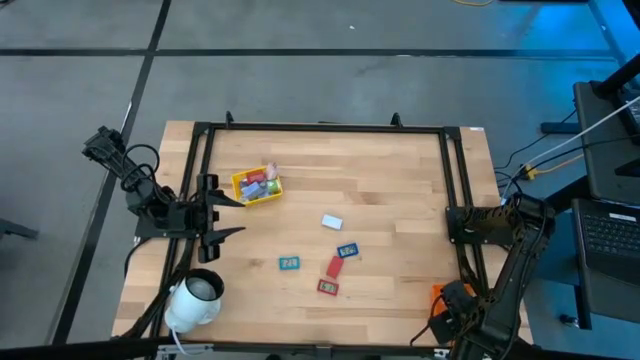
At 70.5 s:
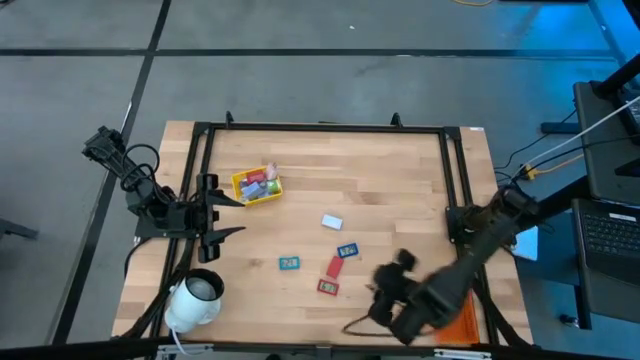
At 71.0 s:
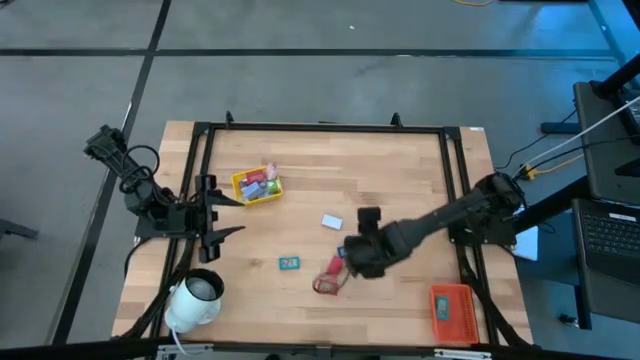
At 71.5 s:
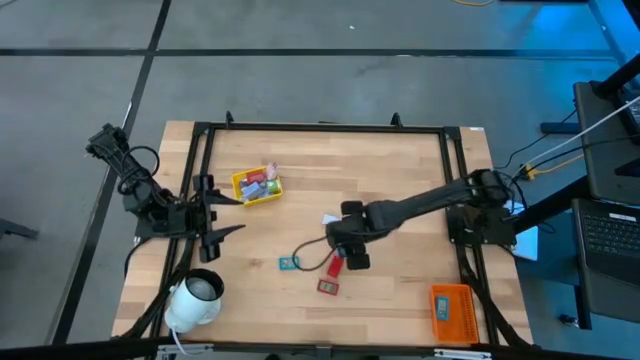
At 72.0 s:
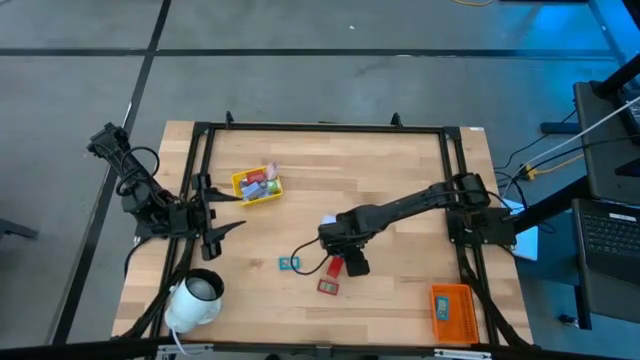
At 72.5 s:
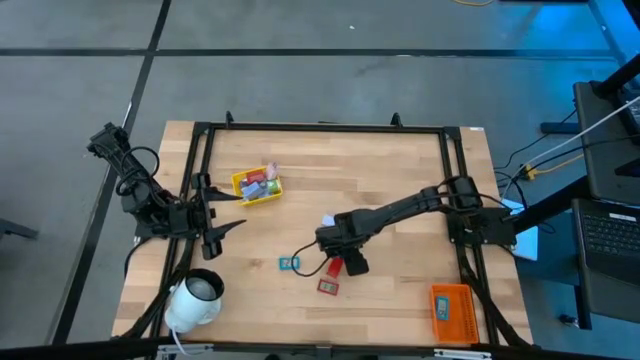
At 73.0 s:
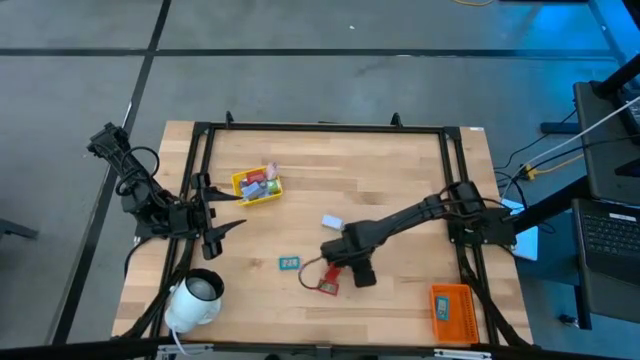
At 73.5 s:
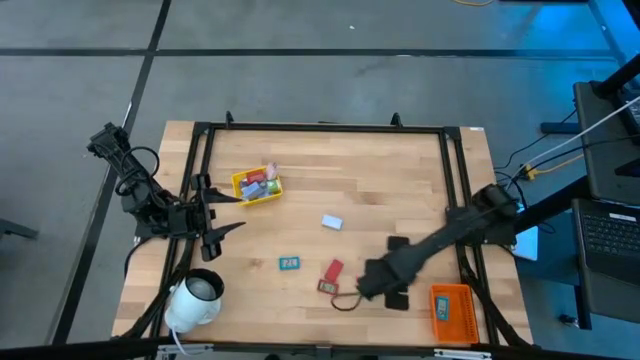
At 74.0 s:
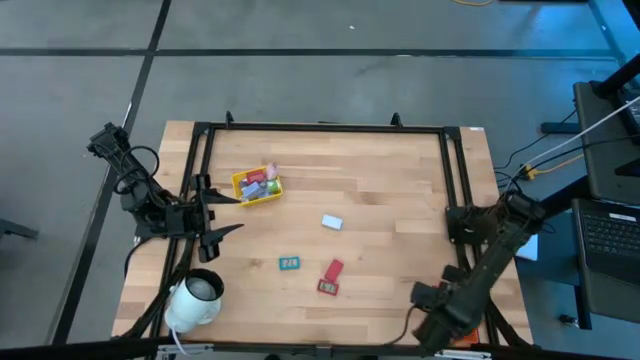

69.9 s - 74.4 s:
Task: Pick & Place Office items
Put the dark blue digital timer into the orange bin

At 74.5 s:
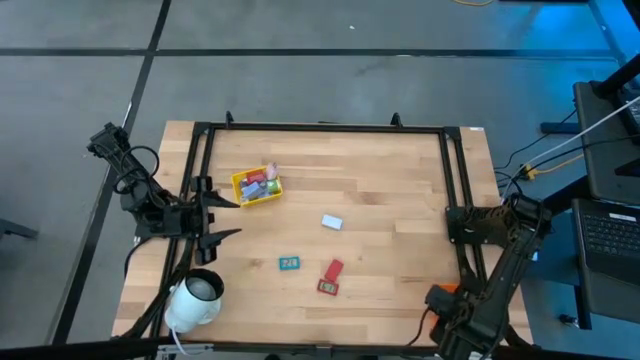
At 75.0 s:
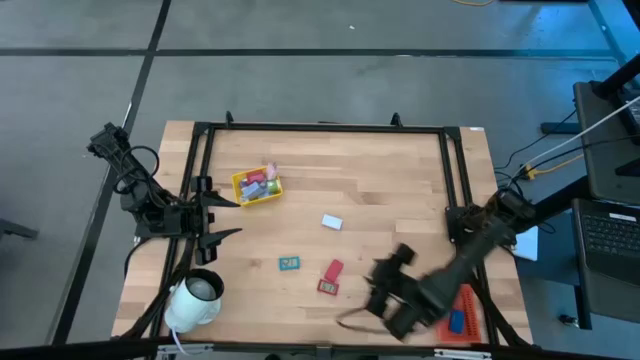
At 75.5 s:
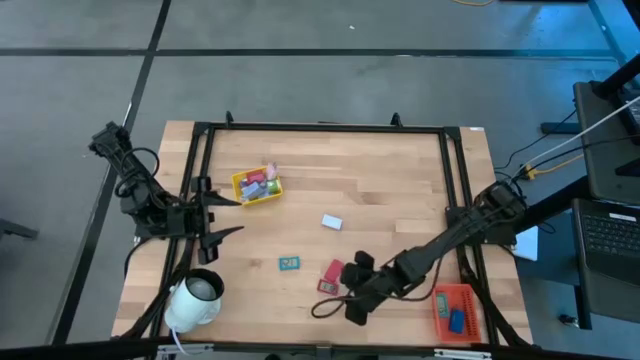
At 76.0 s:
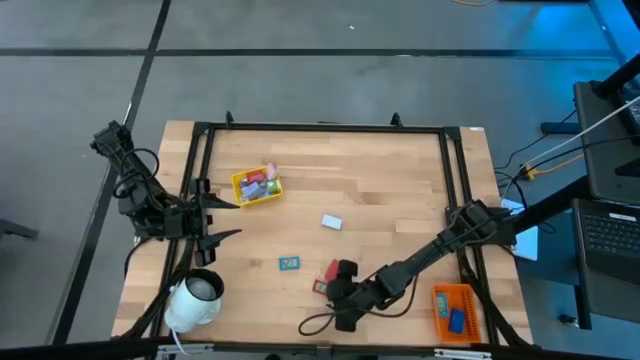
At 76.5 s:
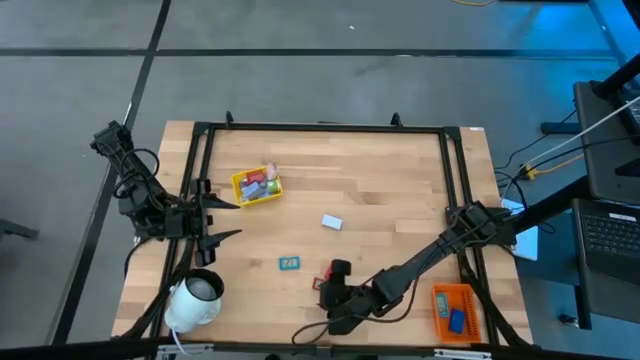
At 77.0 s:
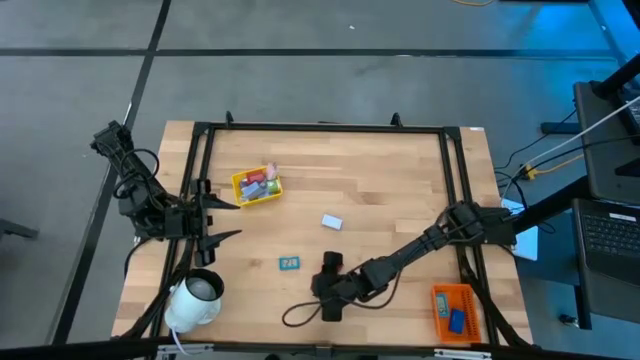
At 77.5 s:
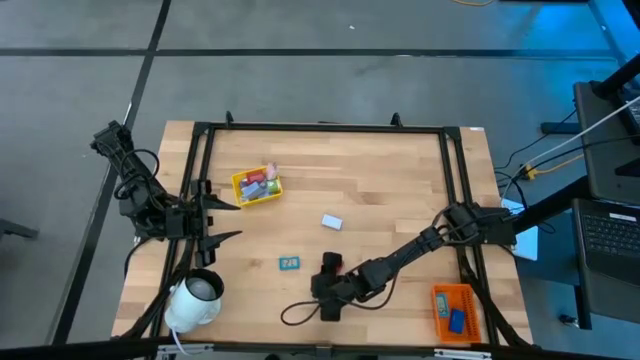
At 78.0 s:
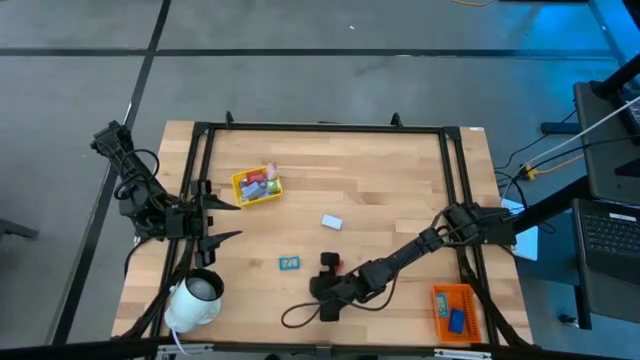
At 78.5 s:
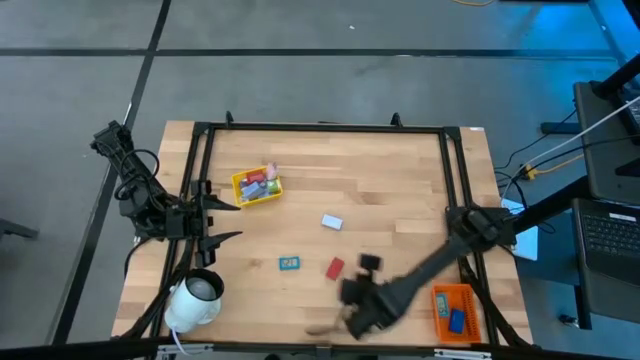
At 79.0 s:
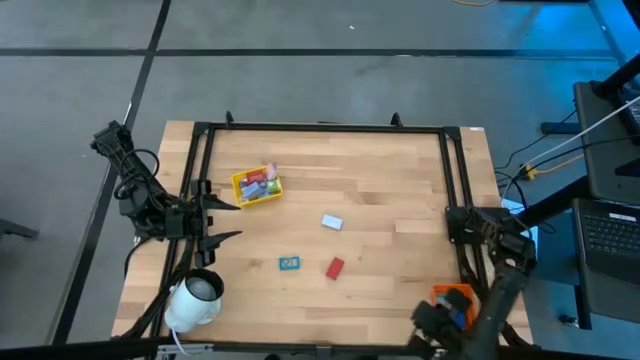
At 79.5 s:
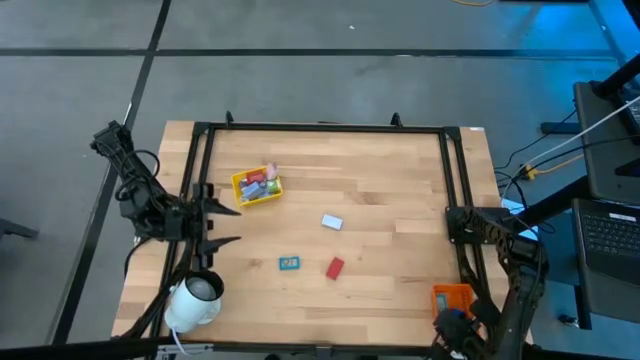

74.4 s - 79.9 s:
Put the bottom red digital timer into the orange bin

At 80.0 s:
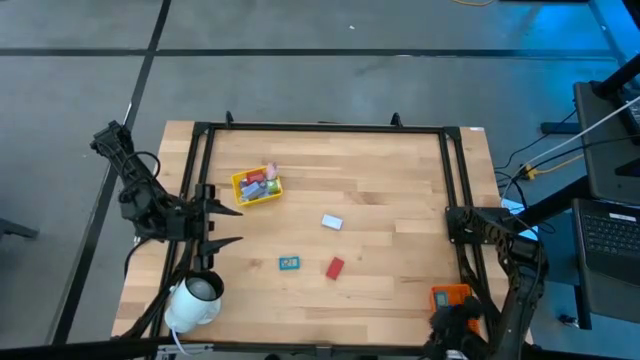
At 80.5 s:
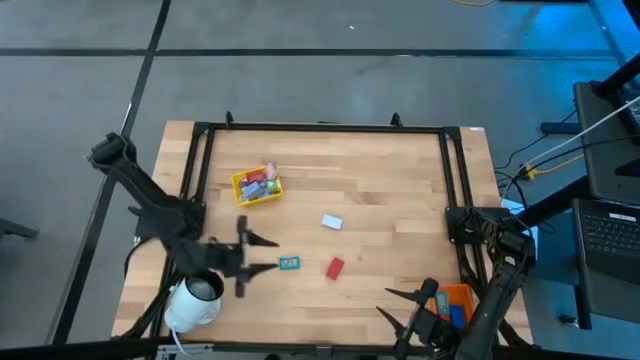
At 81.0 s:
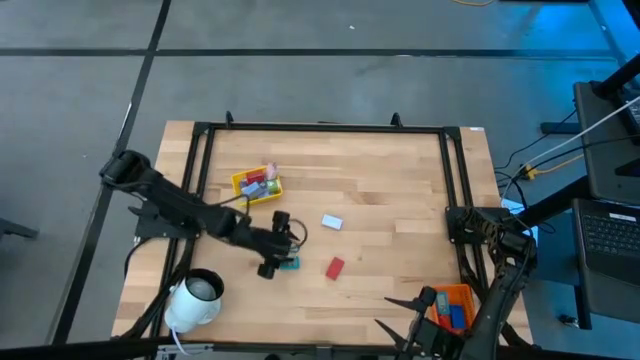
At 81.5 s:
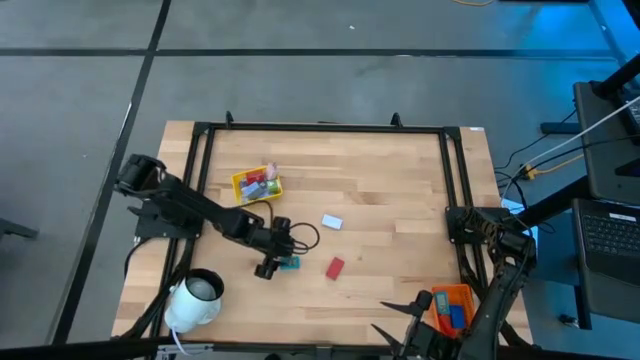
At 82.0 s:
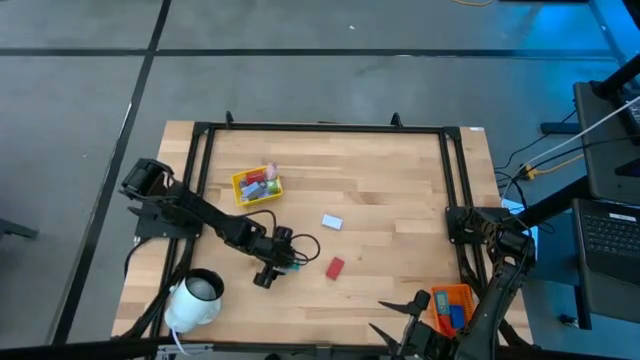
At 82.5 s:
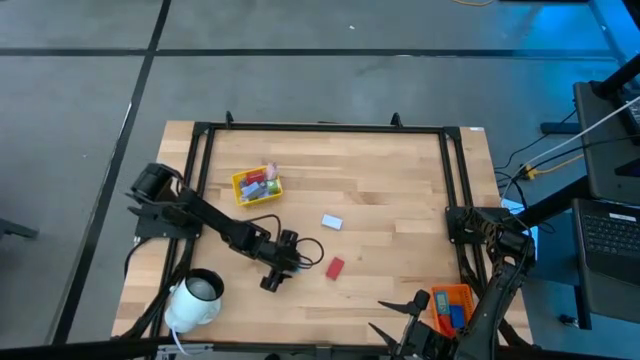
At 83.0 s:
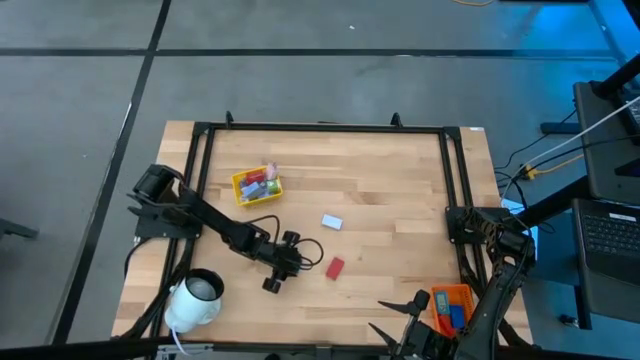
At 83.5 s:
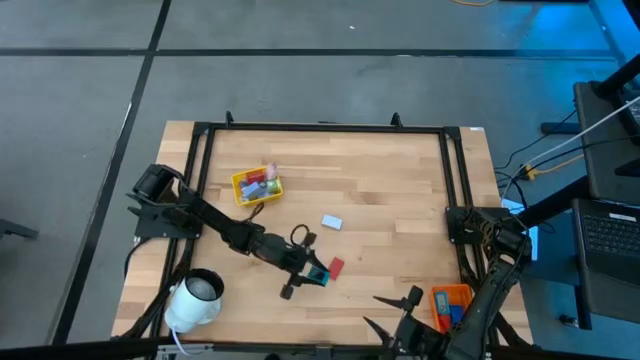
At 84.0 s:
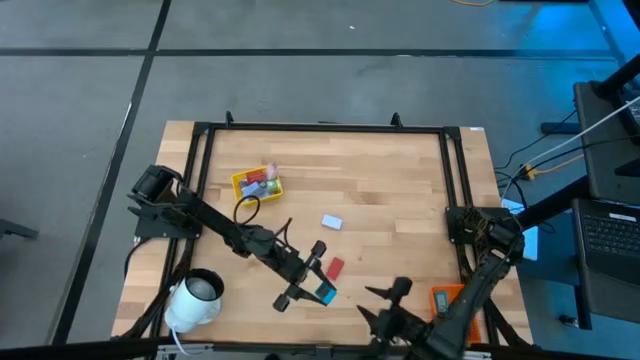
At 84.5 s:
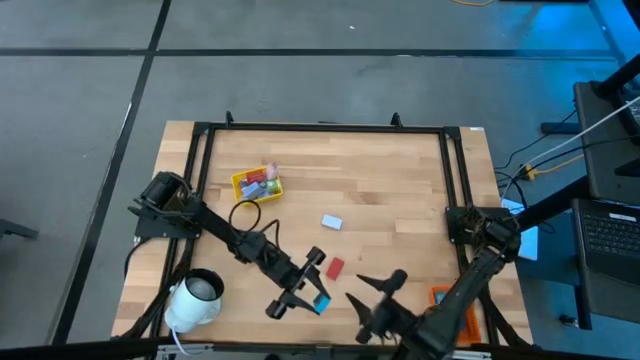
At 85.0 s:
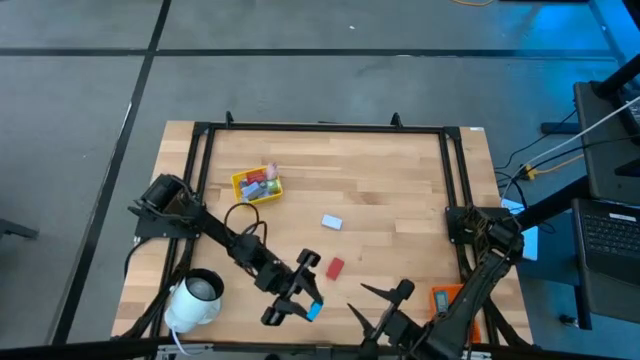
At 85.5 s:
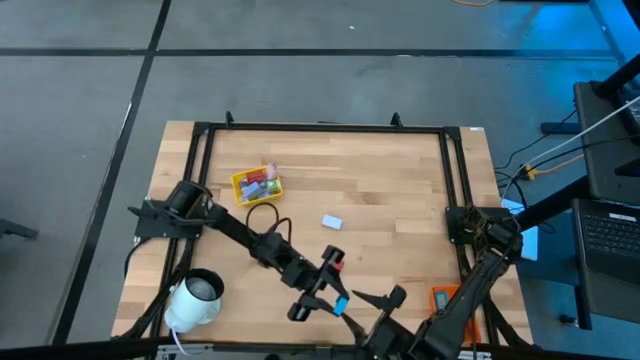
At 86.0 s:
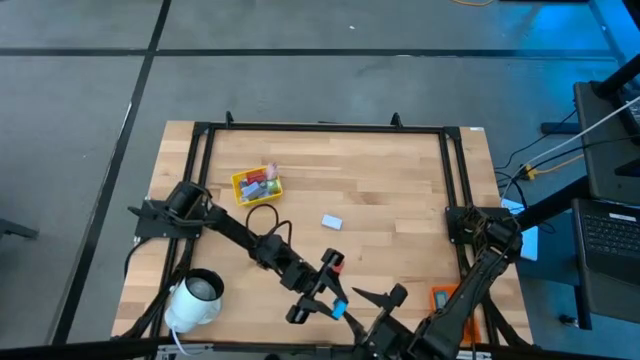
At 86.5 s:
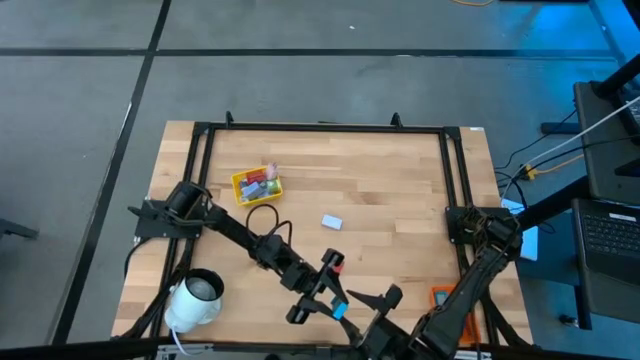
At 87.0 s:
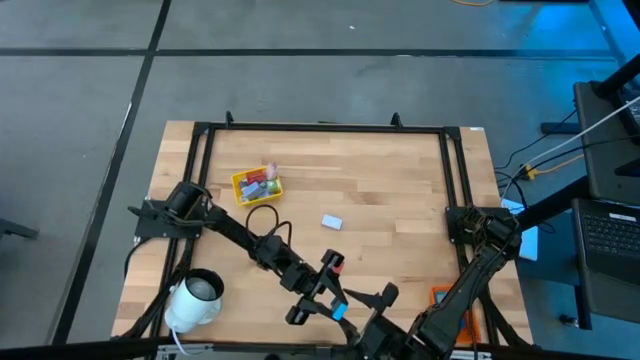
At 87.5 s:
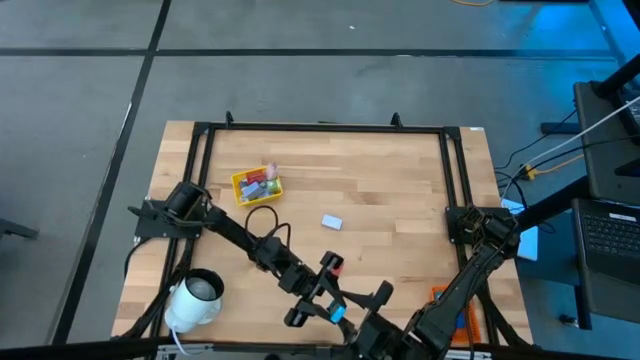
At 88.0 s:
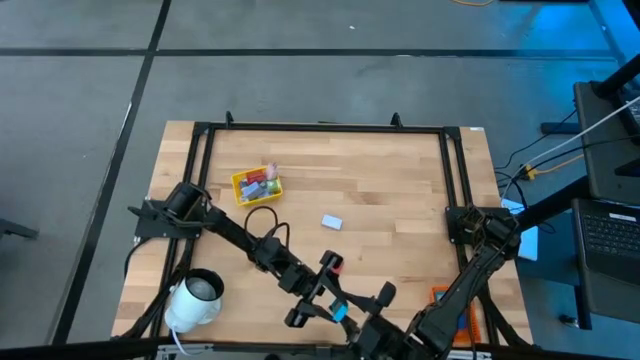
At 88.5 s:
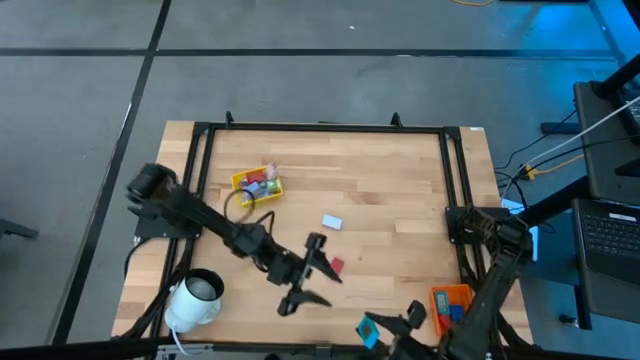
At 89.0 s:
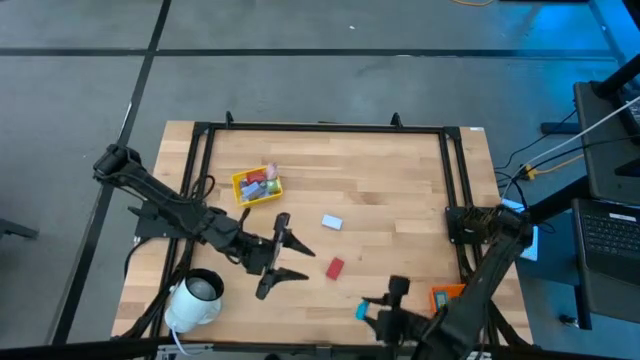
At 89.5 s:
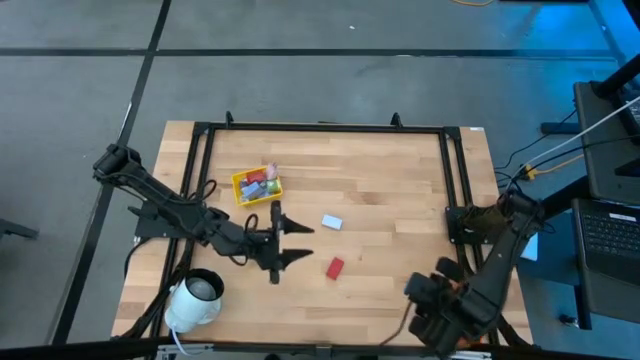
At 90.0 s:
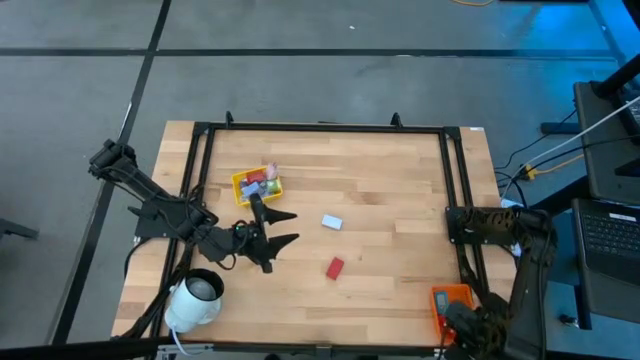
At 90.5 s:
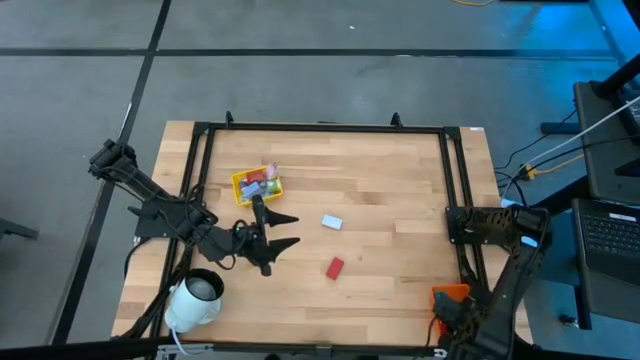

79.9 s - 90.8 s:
Put the light blue digital timer into the orange bin
